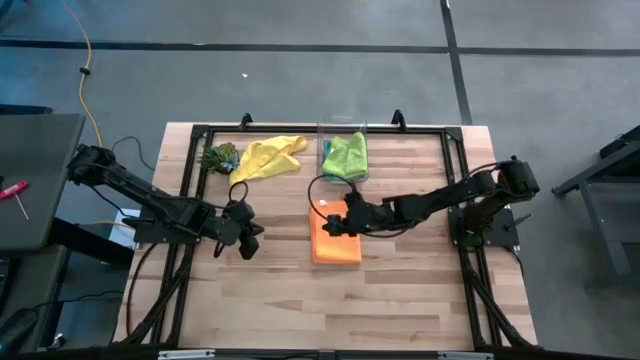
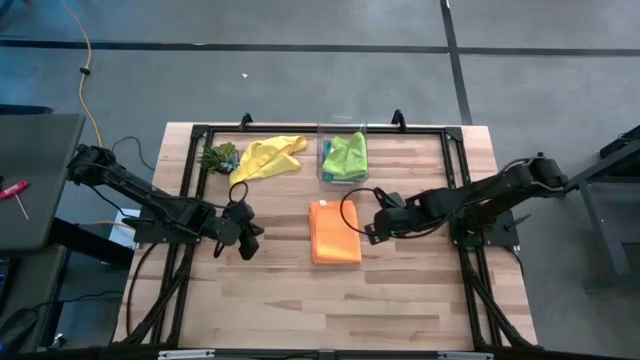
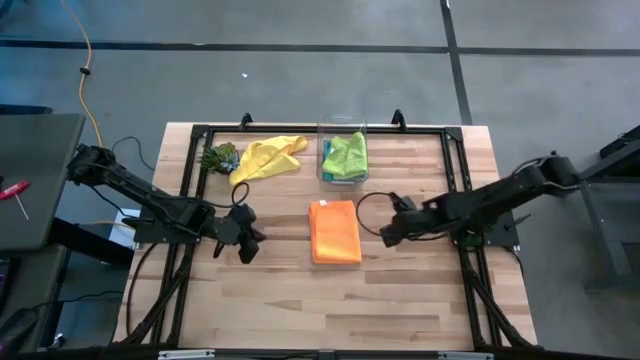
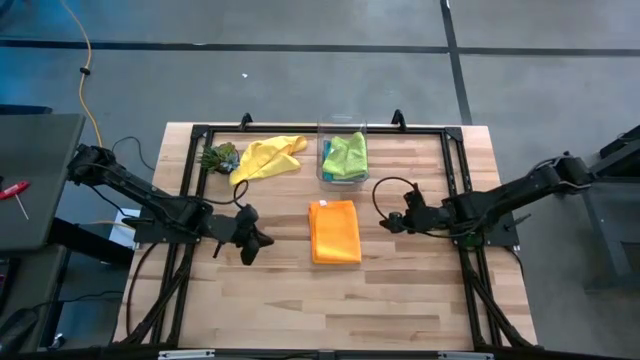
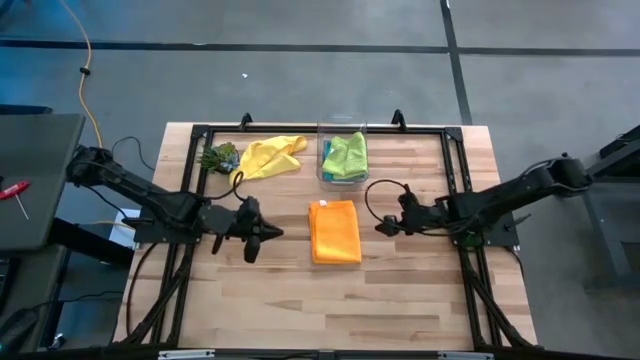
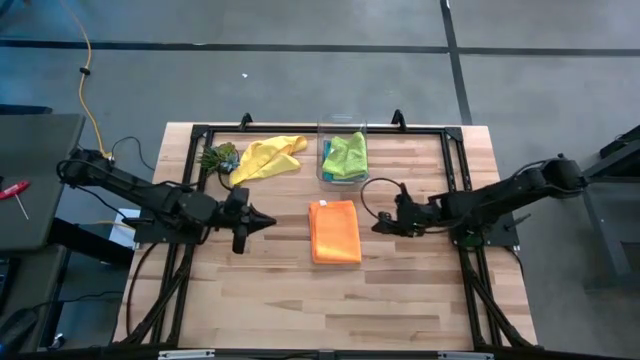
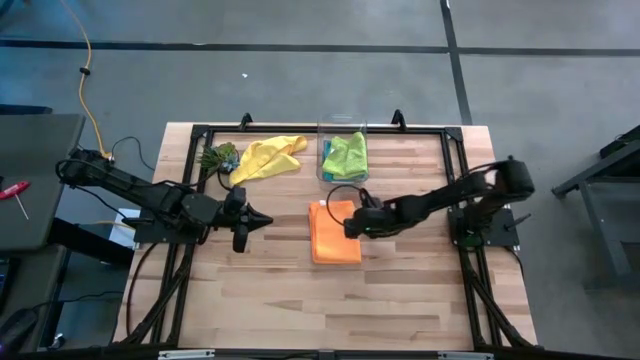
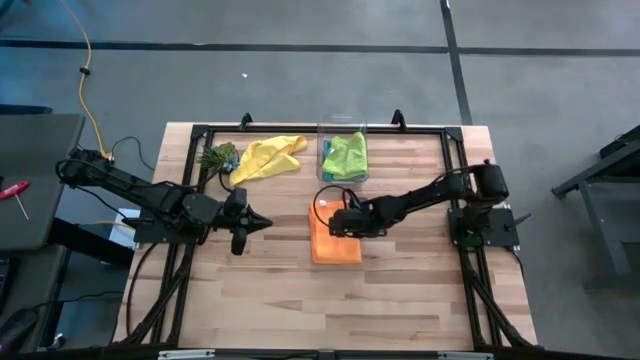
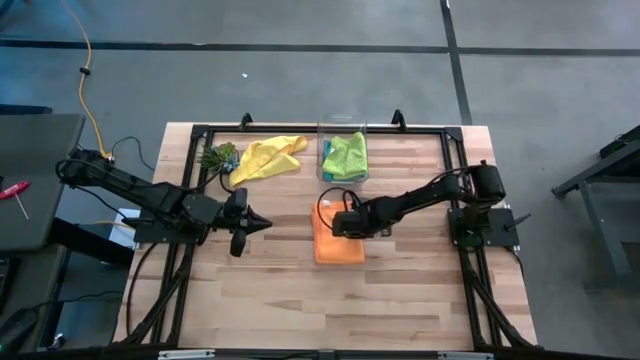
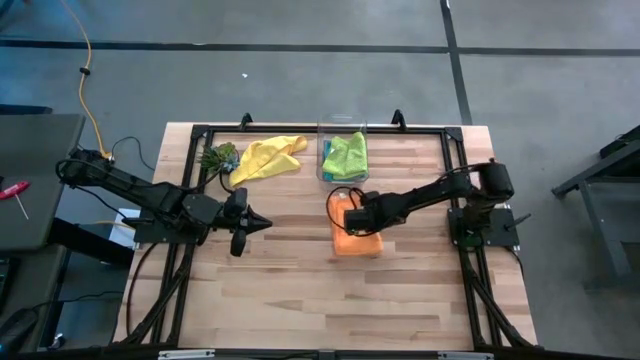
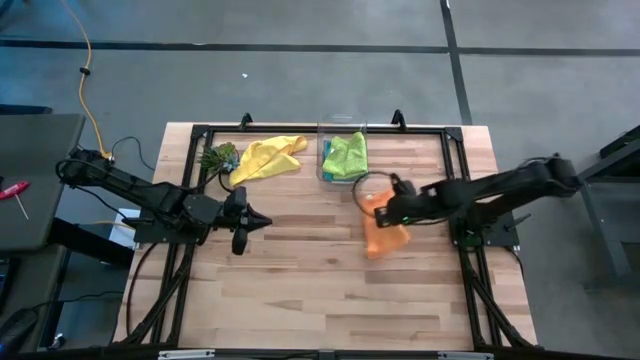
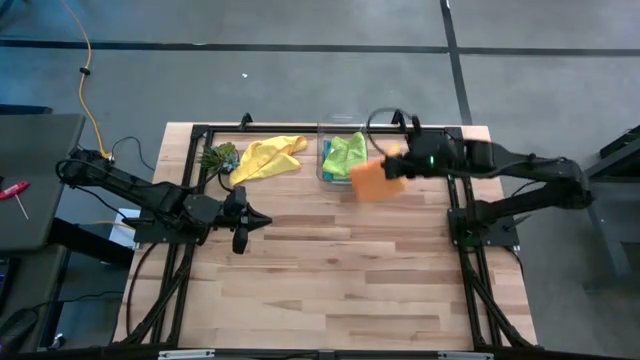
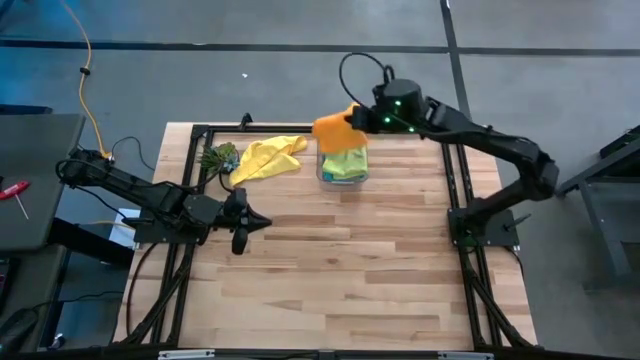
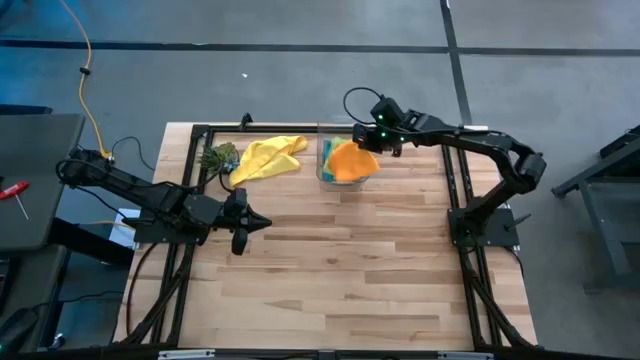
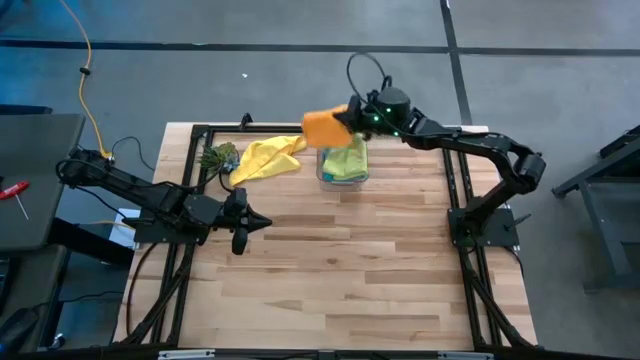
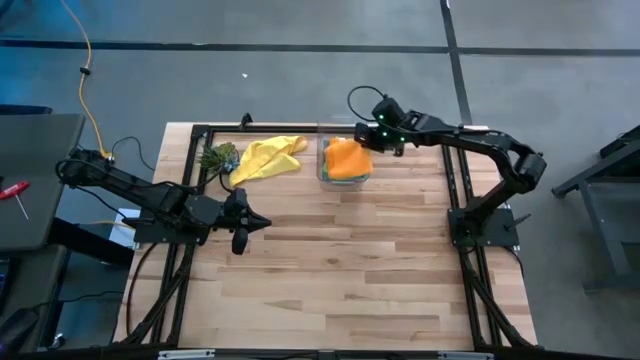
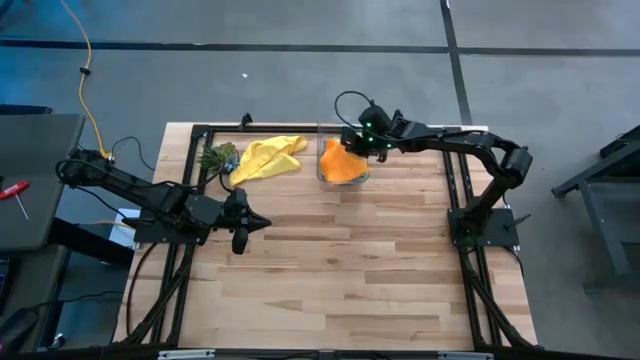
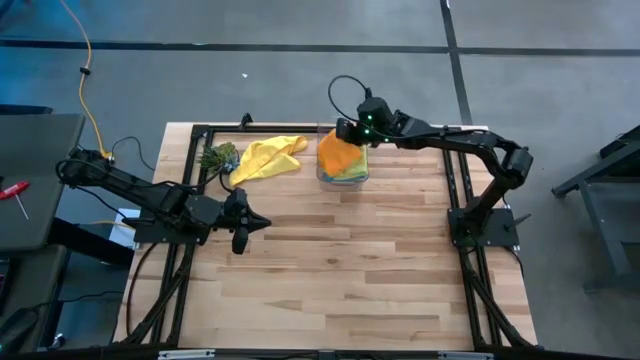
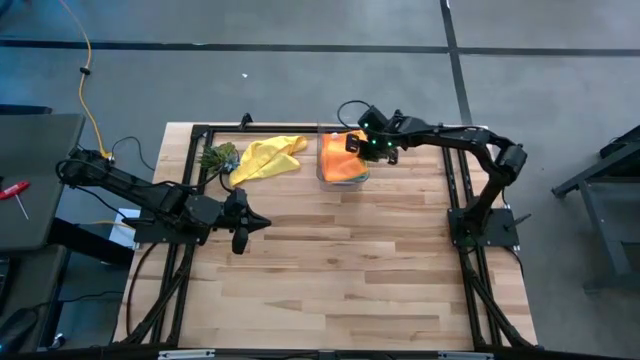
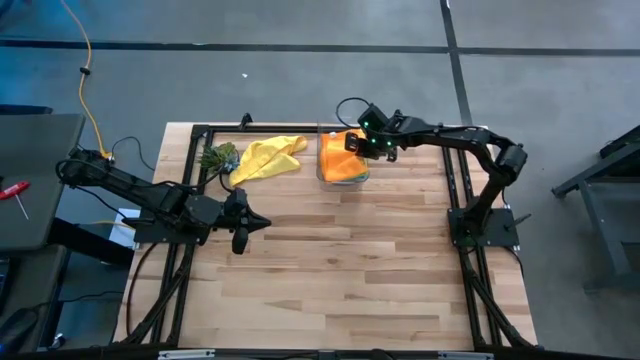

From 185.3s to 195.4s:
Task: Fold microfiber towels
Put the orange microfiber cloth into the transparent bin

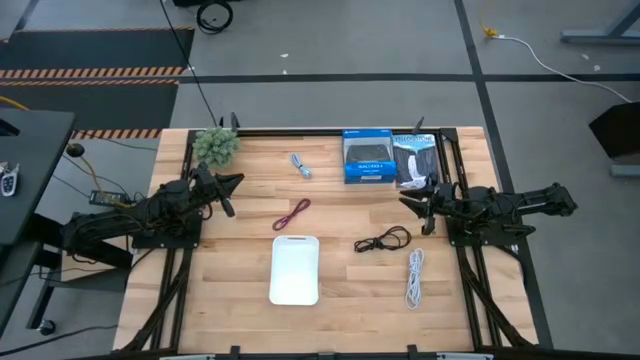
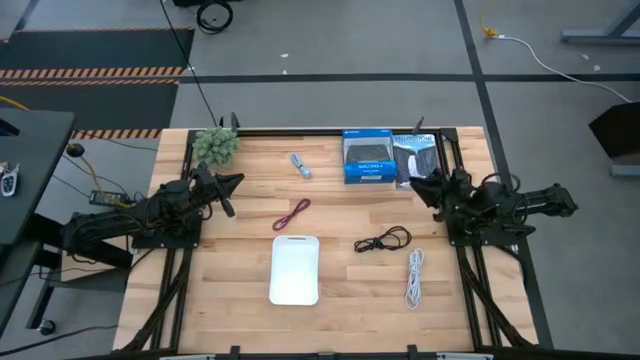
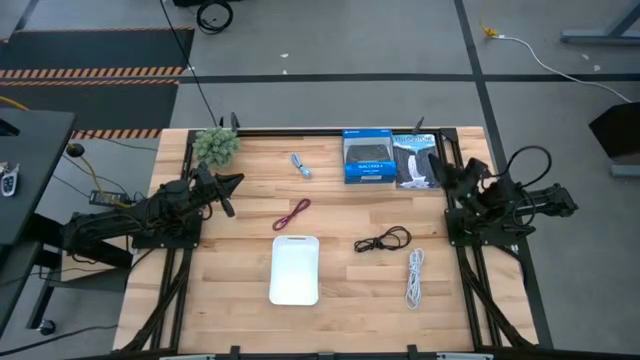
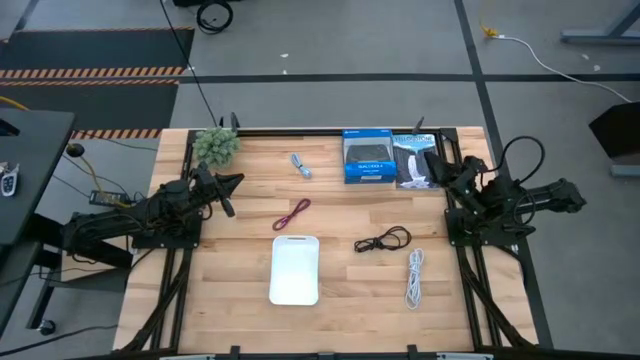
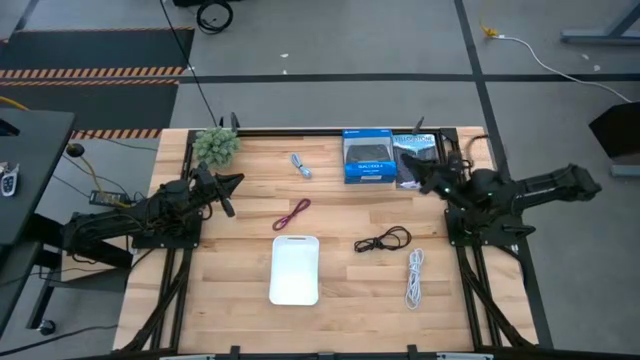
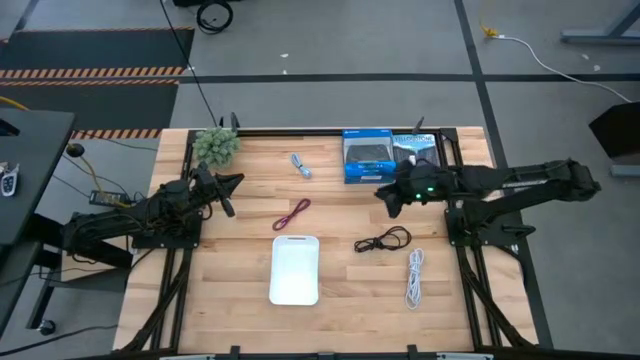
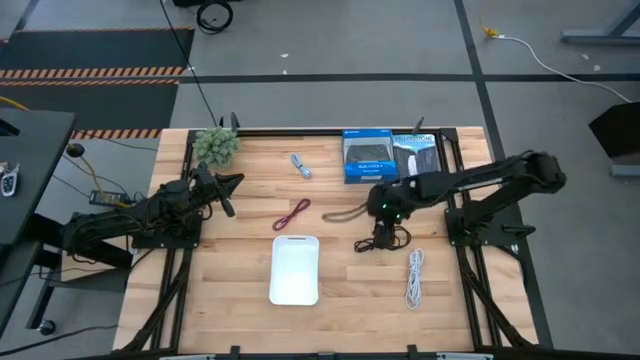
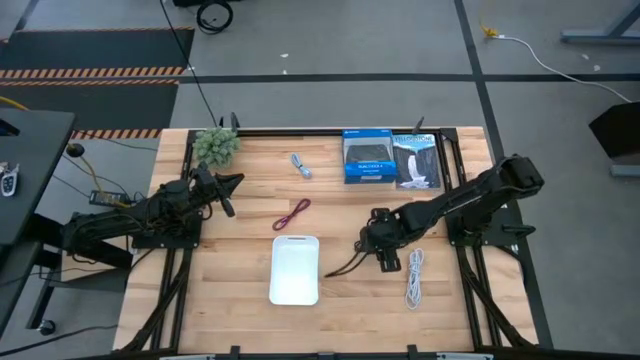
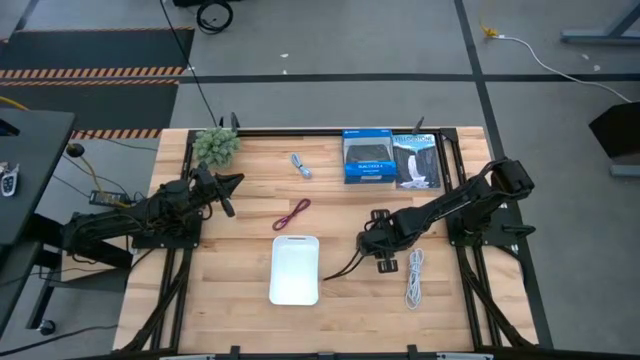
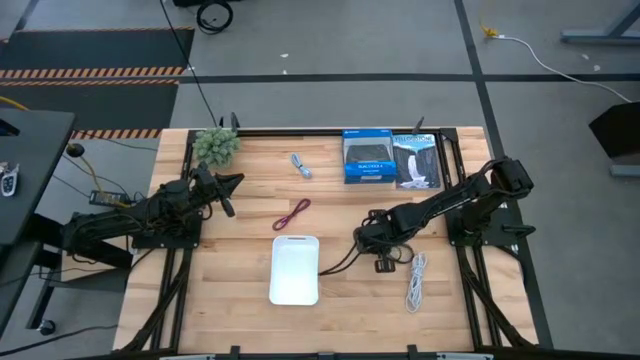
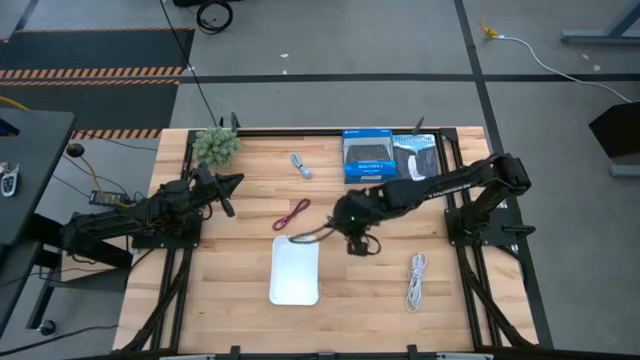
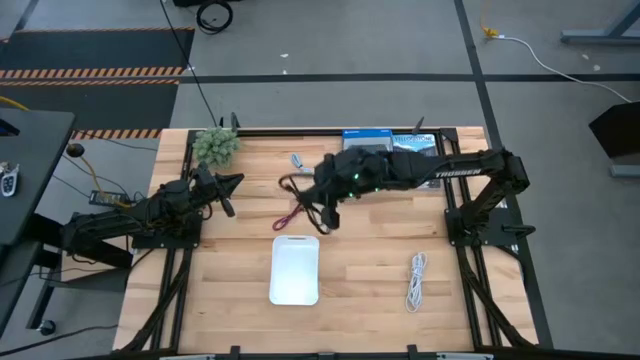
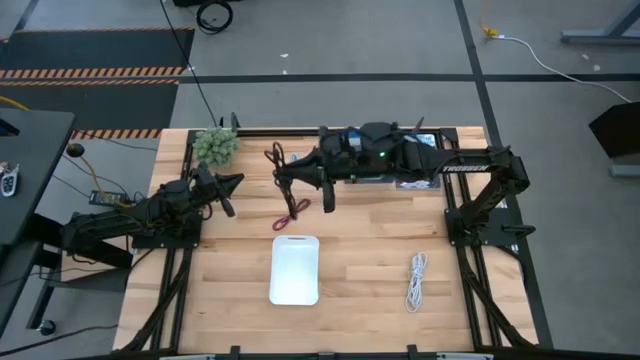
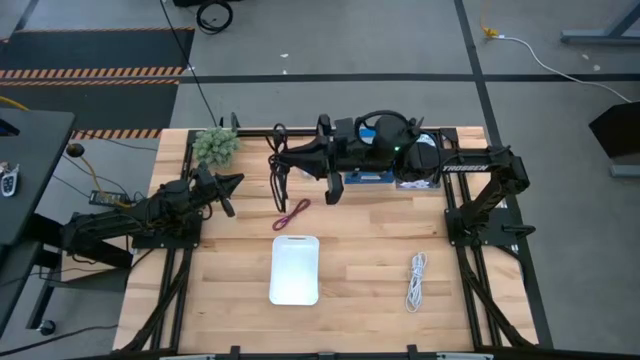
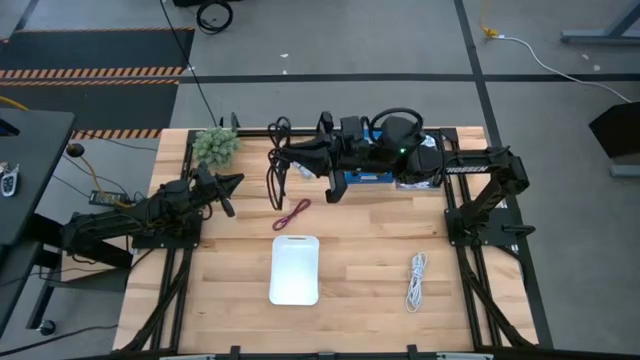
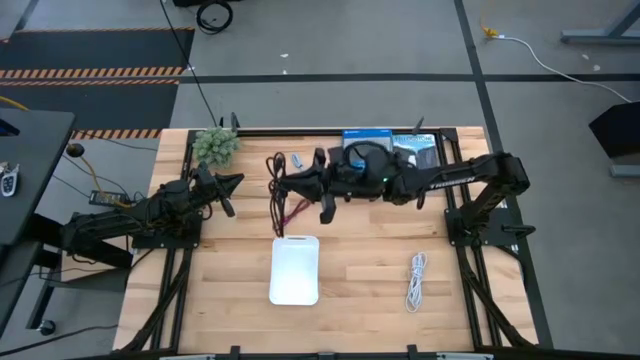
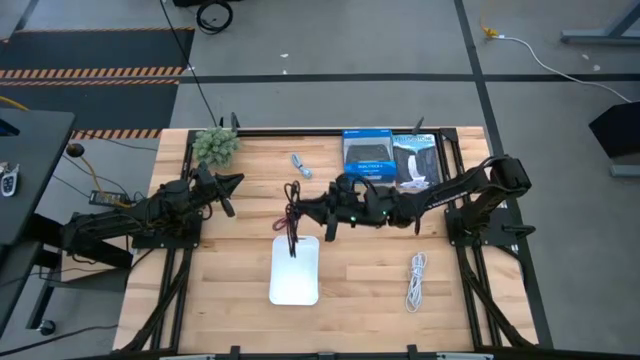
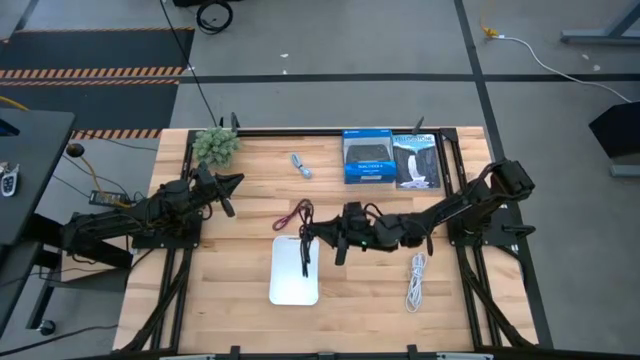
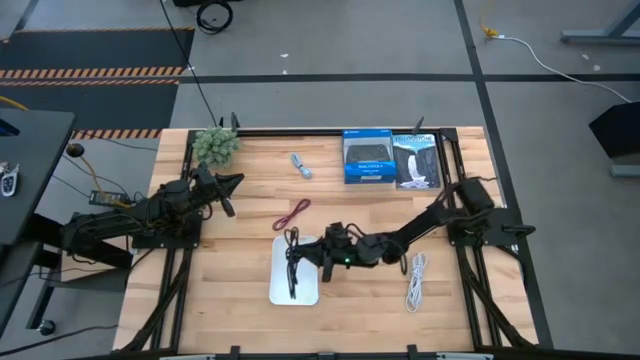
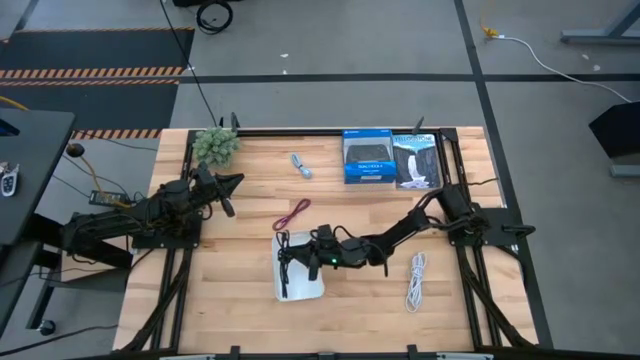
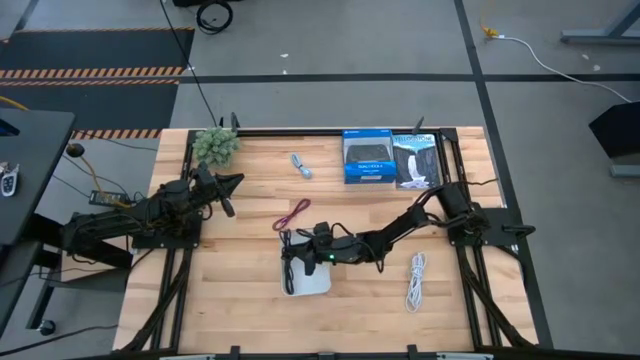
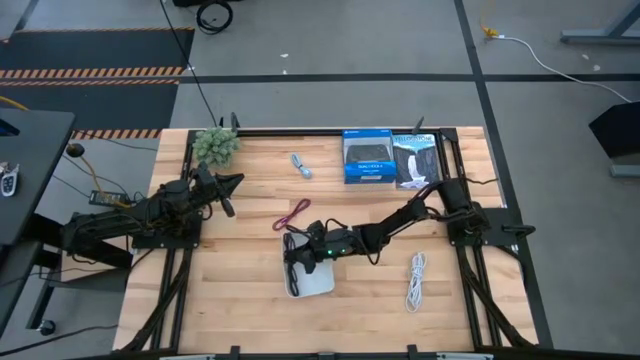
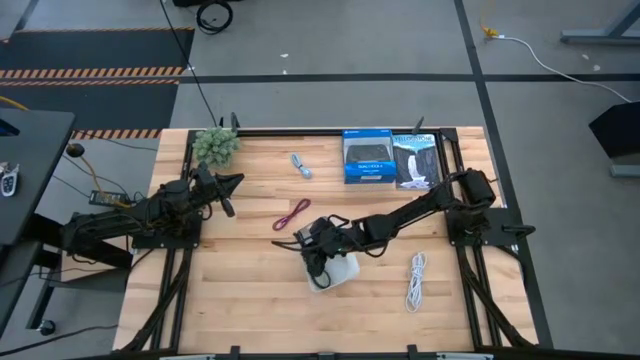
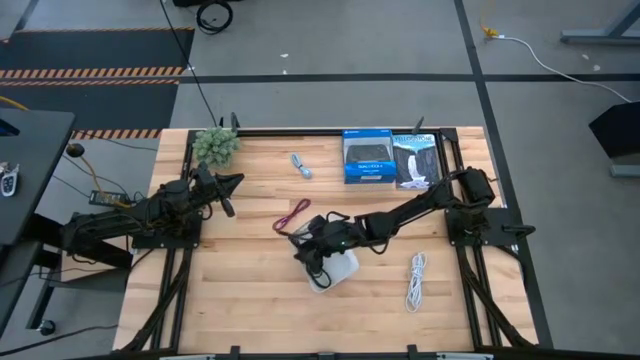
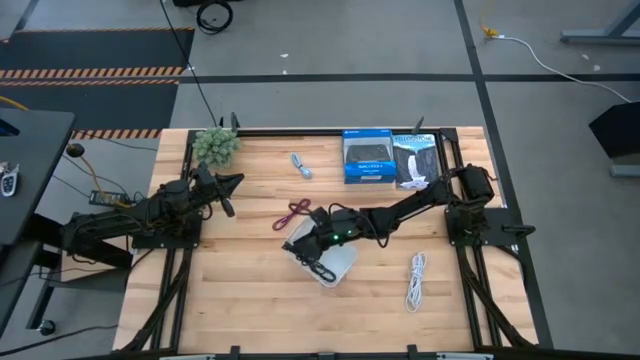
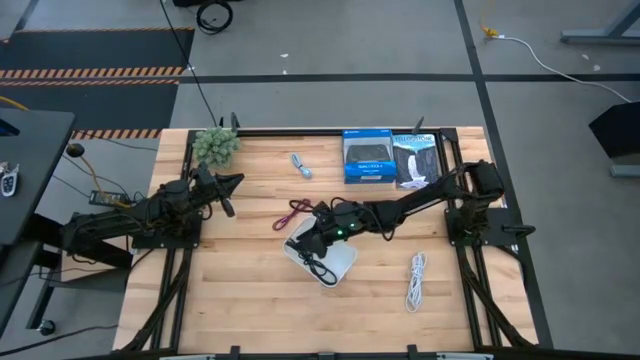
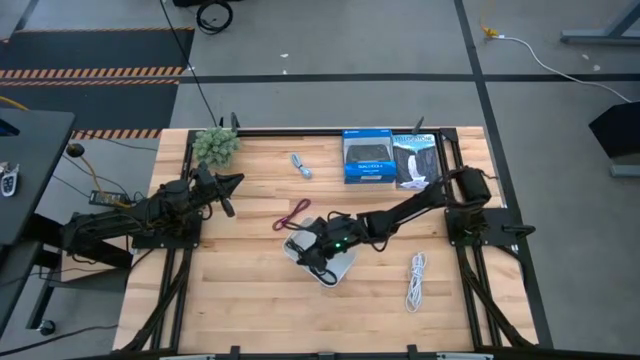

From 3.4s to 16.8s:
Task: Pick and place USB-C Cables
Put the black charger cable into the white bin
